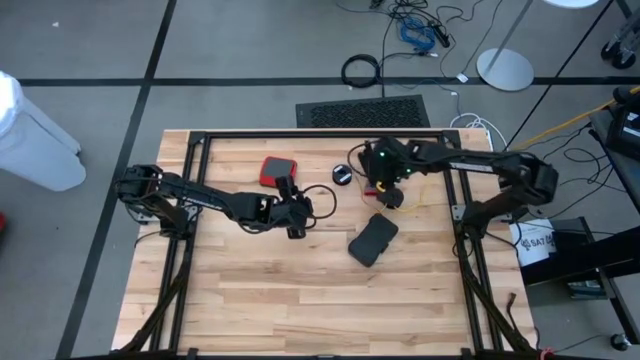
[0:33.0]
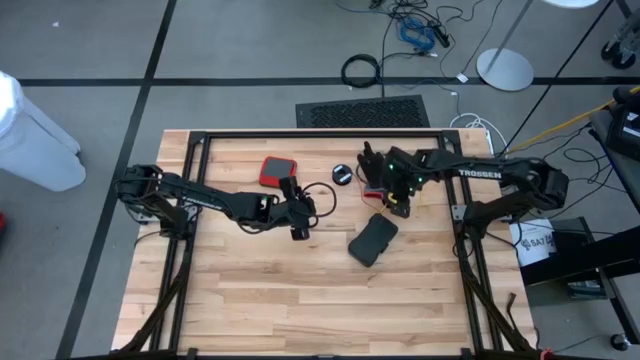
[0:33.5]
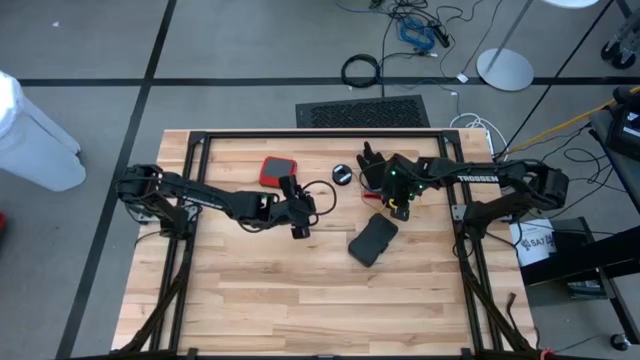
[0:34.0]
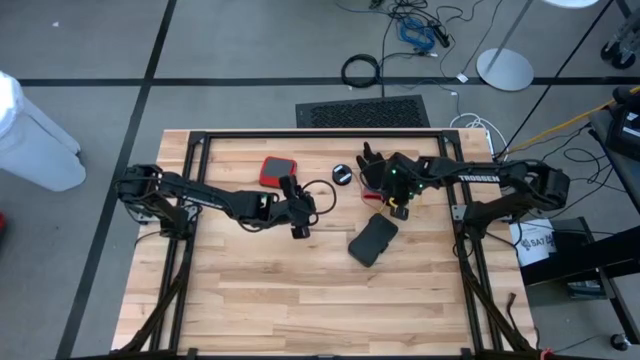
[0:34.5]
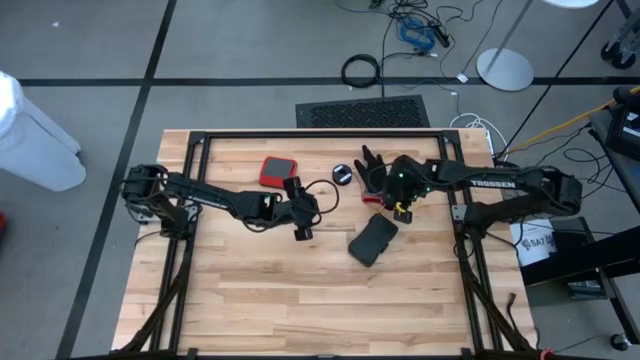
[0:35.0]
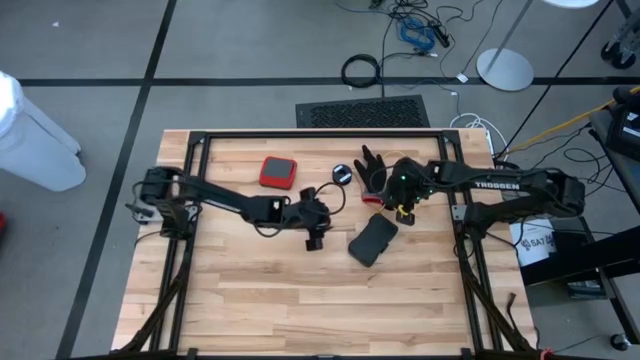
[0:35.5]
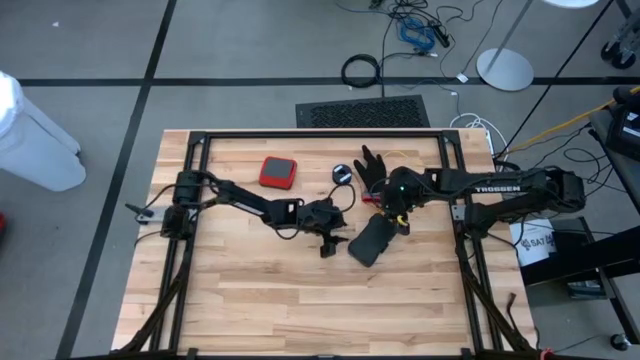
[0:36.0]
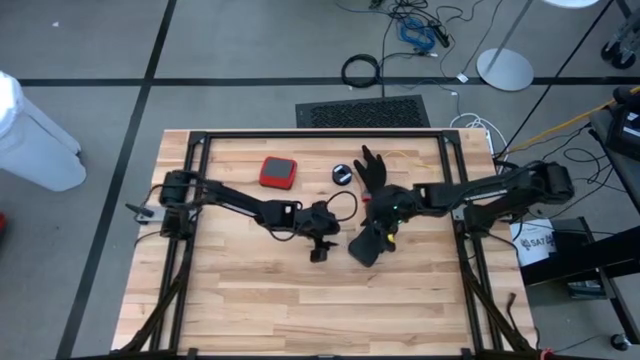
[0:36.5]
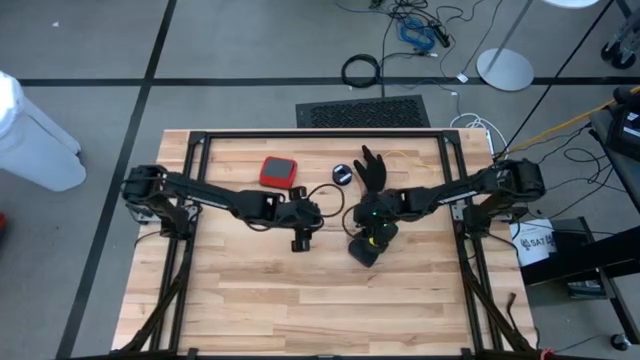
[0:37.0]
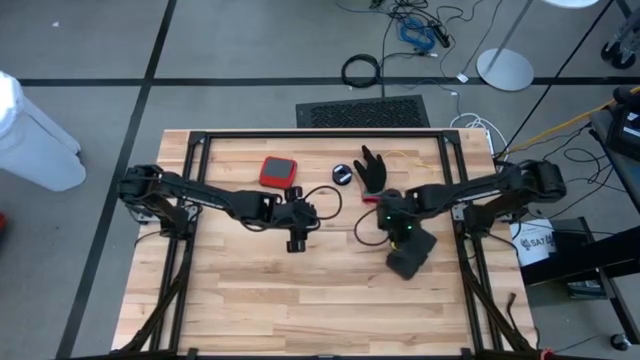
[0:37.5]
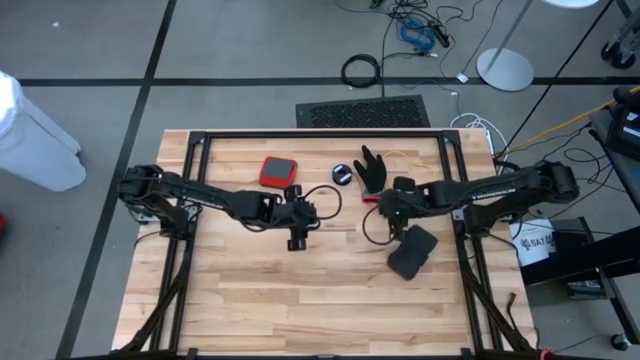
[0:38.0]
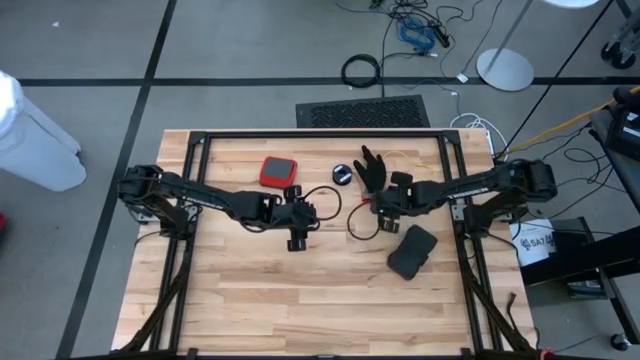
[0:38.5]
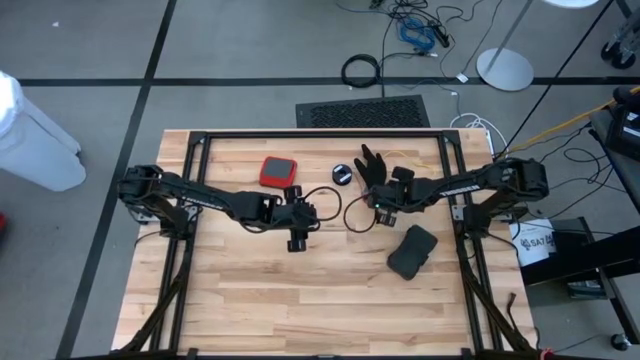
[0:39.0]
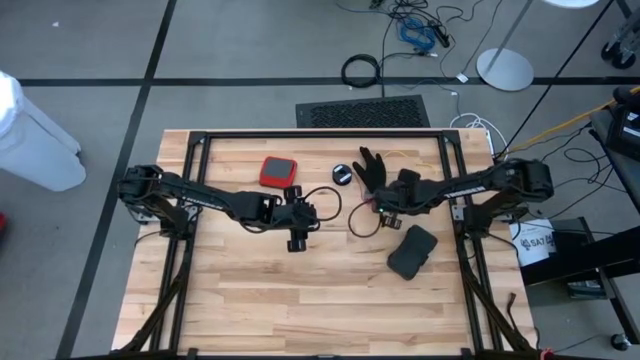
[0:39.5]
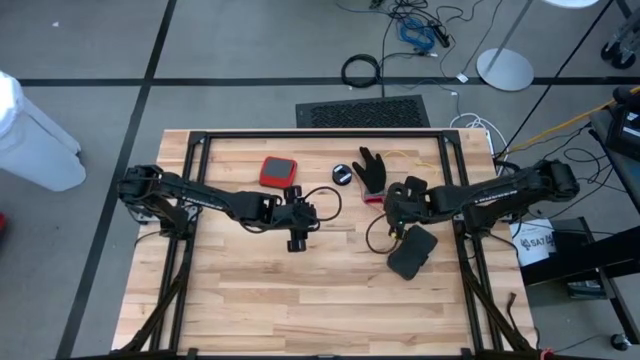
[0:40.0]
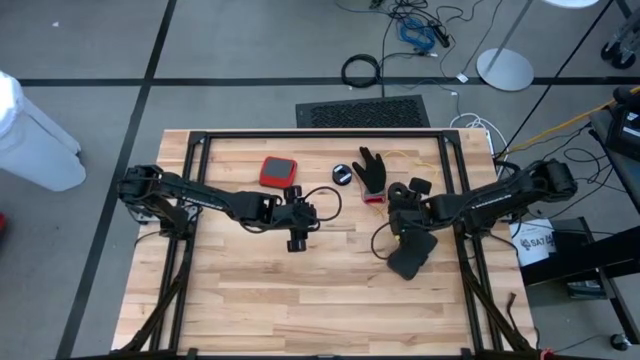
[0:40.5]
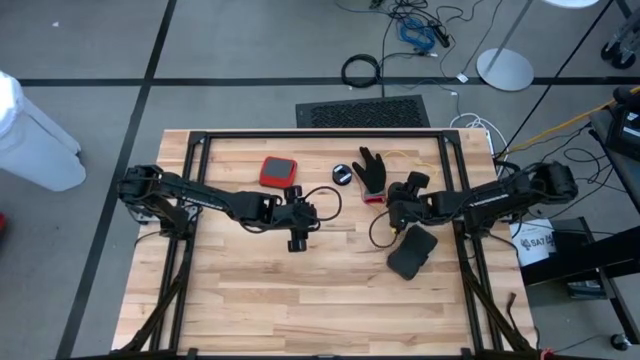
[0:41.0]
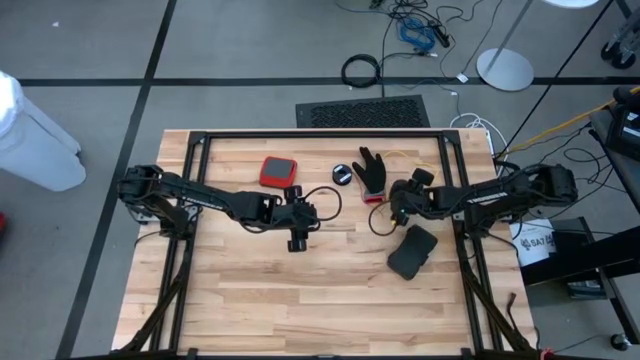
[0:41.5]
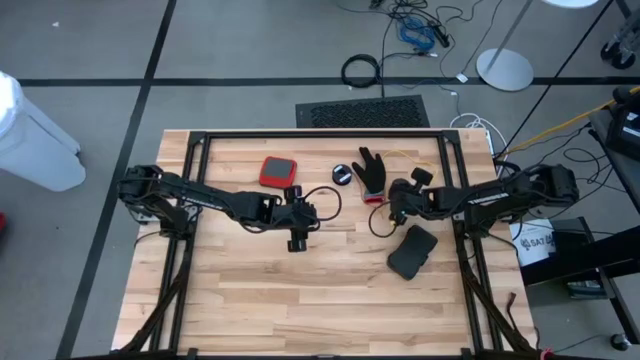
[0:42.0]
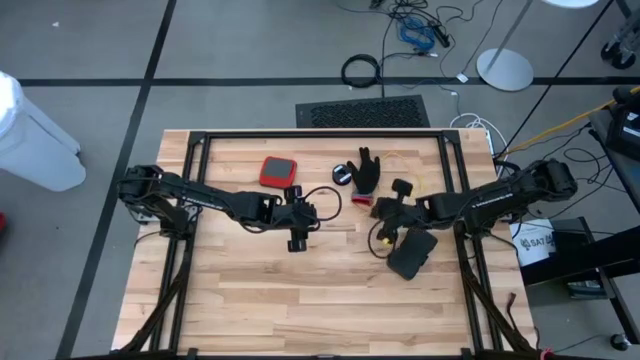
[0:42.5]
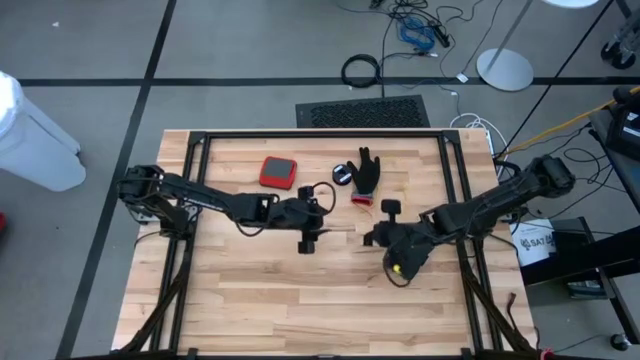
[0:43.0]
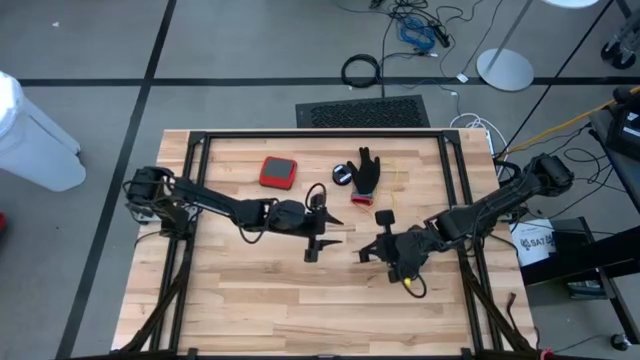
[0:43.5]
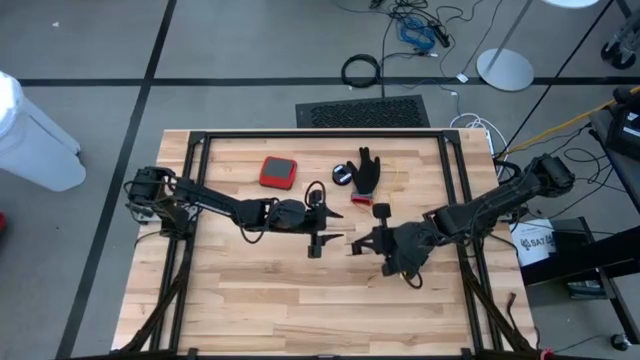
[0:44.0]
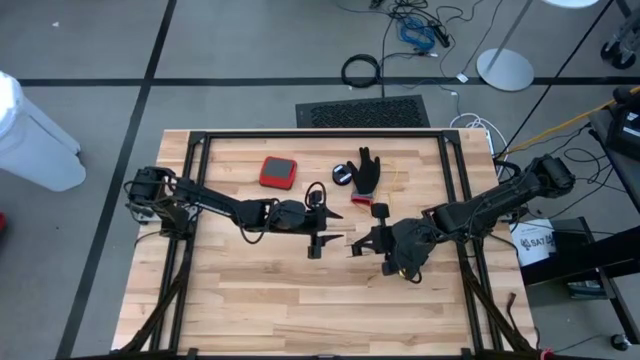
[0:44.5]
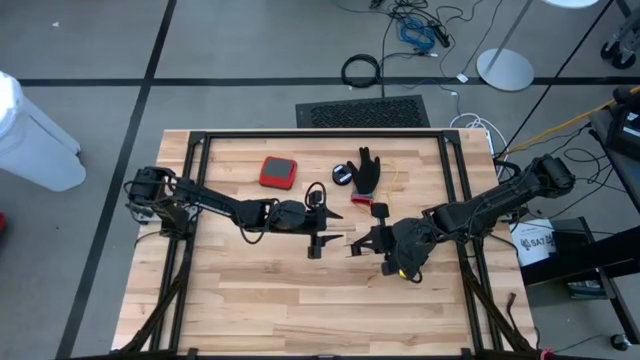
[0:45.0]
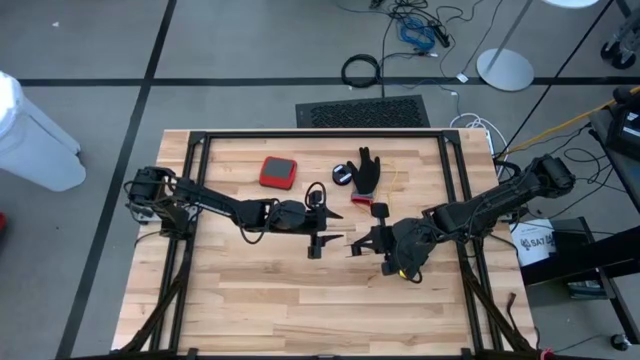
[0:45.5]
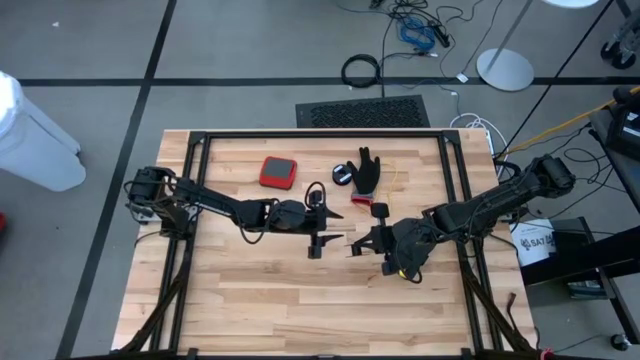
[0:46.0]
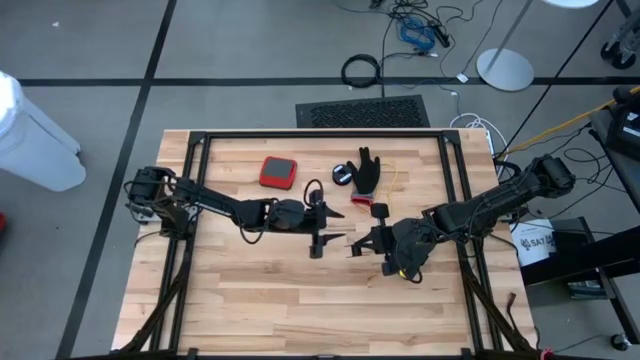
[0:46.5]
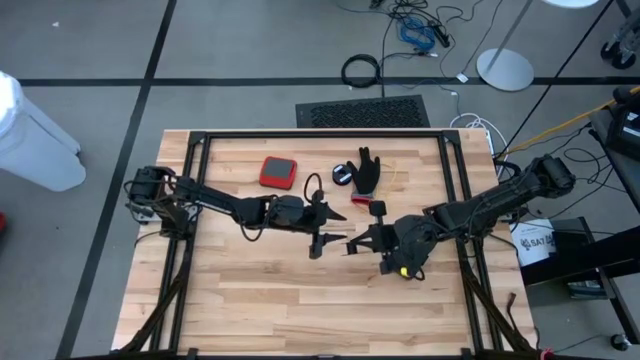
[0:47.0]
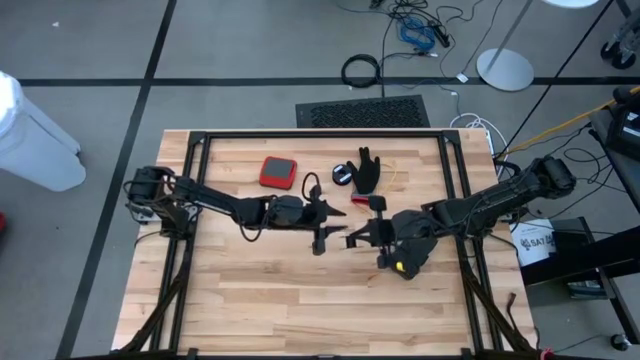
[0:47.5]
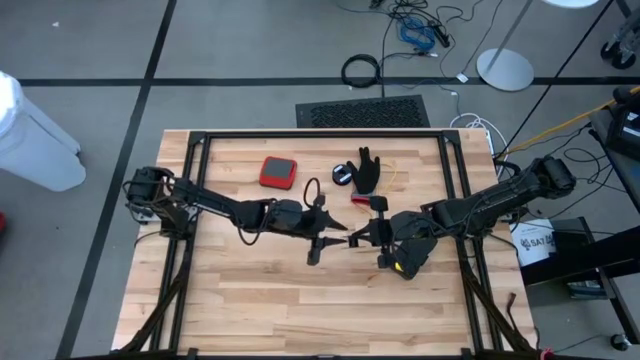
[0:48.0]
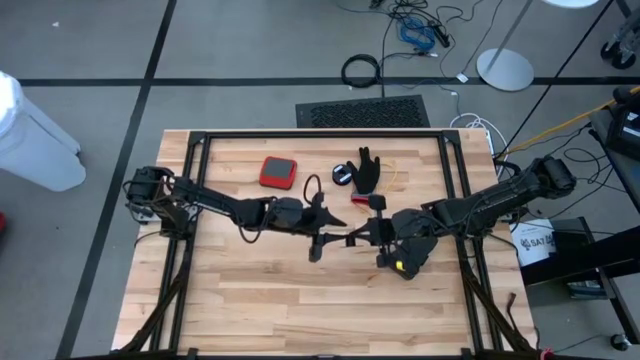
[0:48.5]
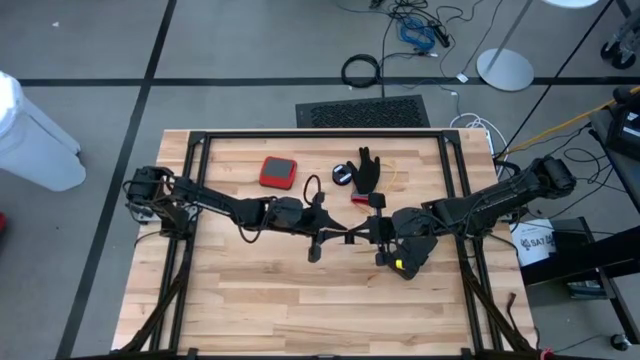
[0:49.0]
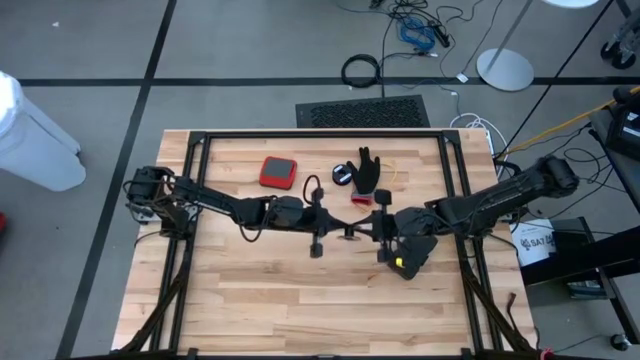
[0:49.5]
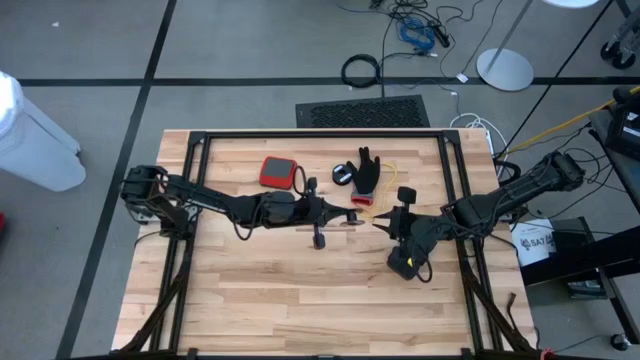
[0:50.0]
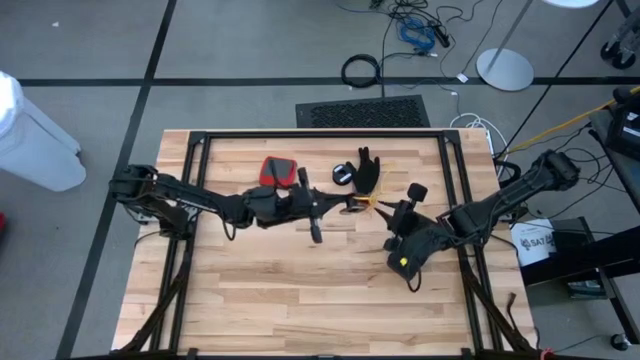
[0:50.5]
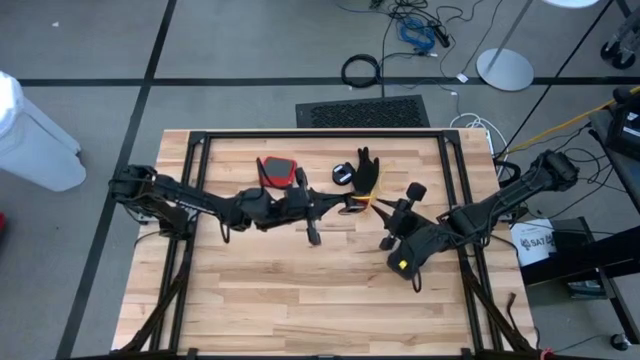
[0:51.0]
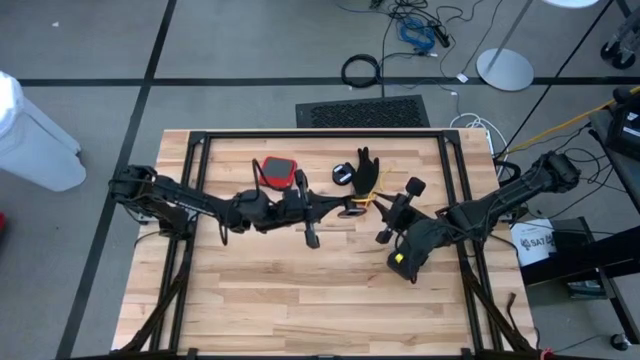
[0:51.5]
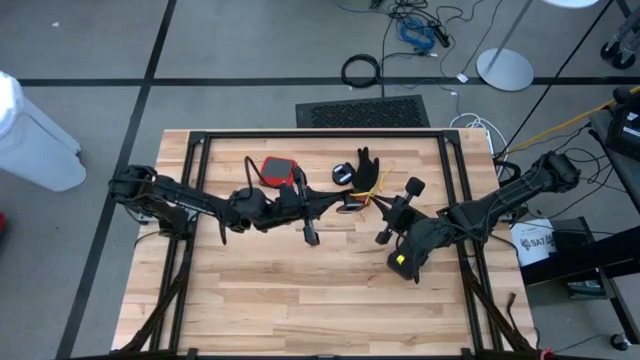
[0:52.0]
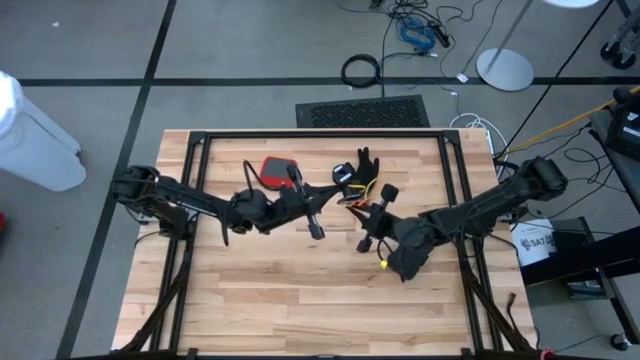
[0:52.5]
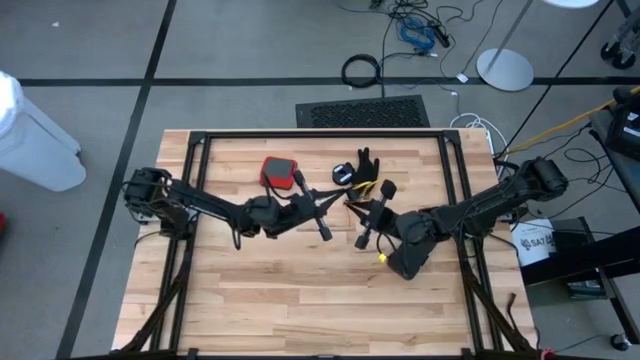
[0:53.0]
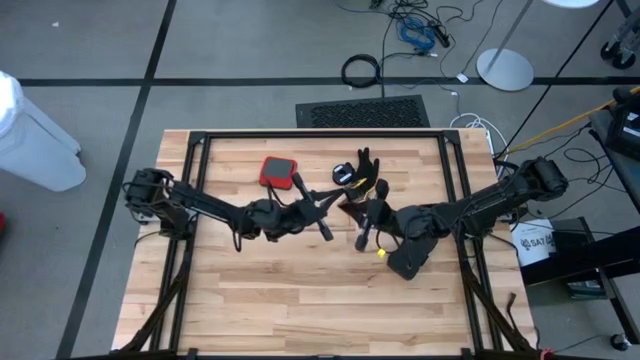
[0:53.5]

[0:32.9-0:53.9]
Task: Coil cords
Coil the yellow wire onto spool
